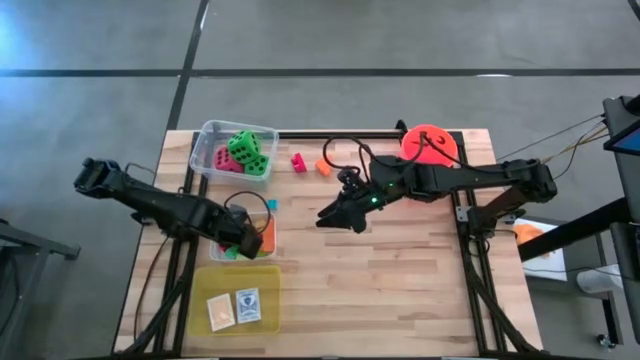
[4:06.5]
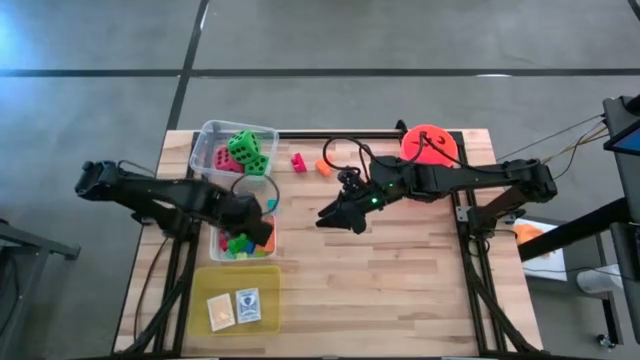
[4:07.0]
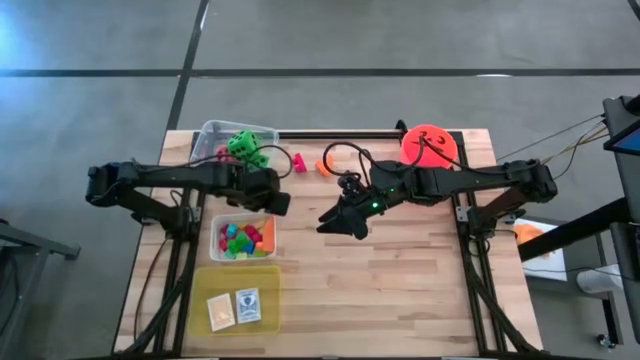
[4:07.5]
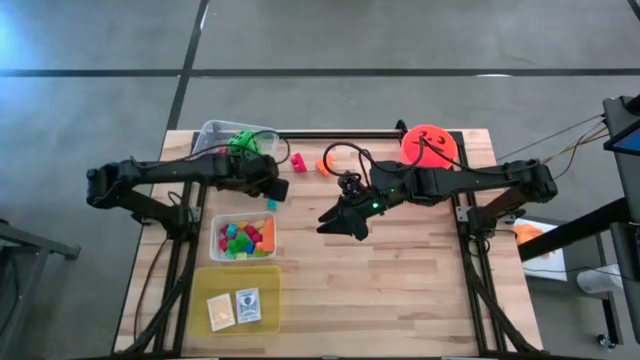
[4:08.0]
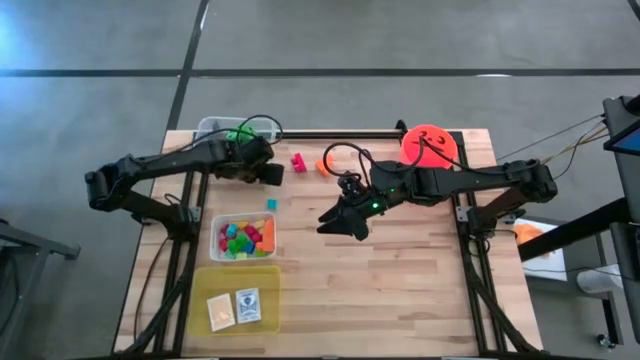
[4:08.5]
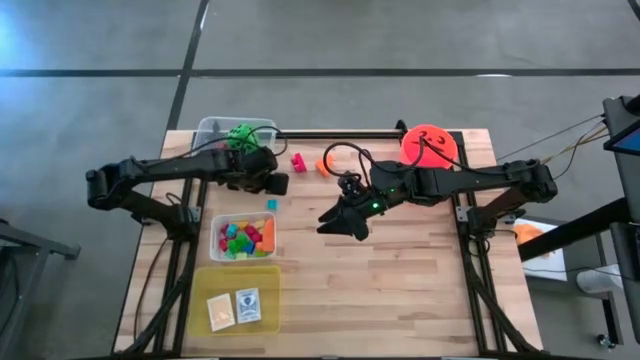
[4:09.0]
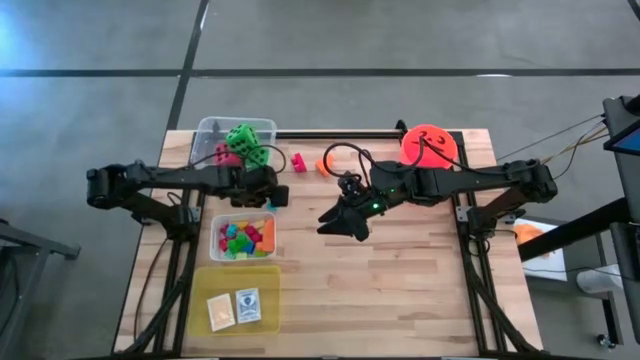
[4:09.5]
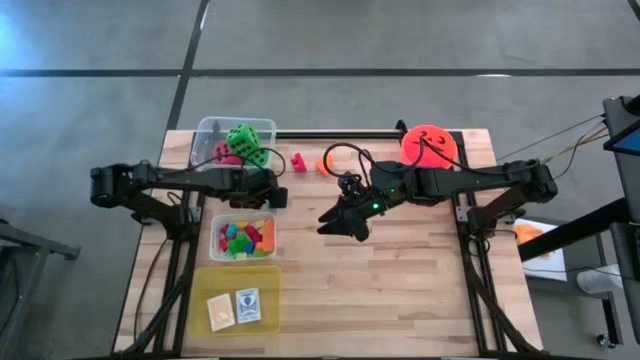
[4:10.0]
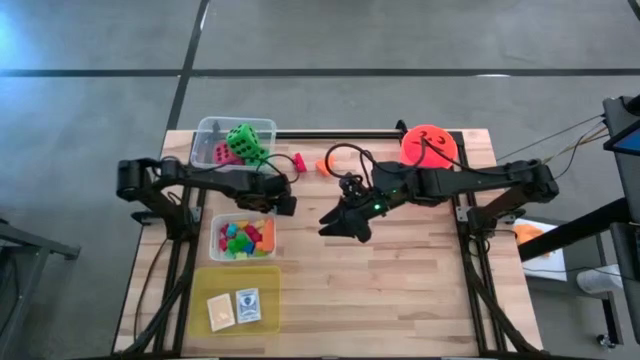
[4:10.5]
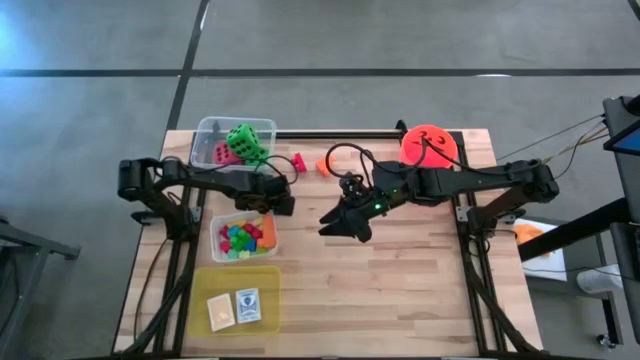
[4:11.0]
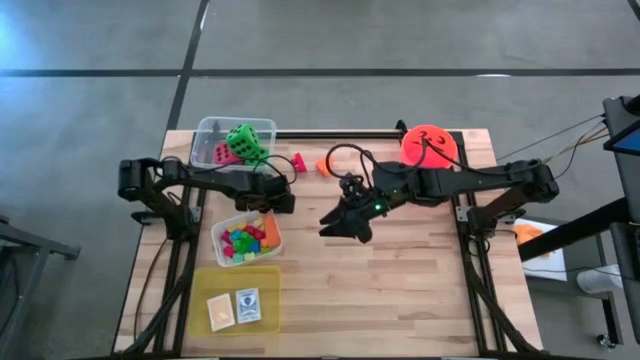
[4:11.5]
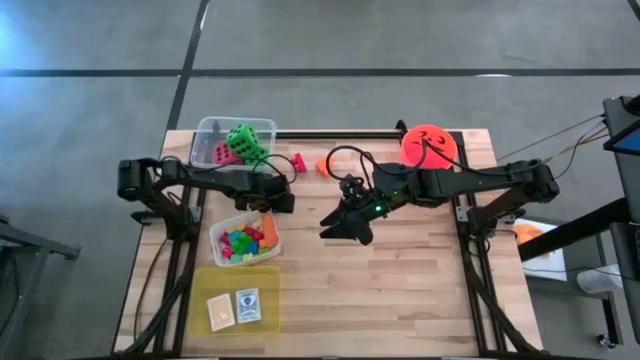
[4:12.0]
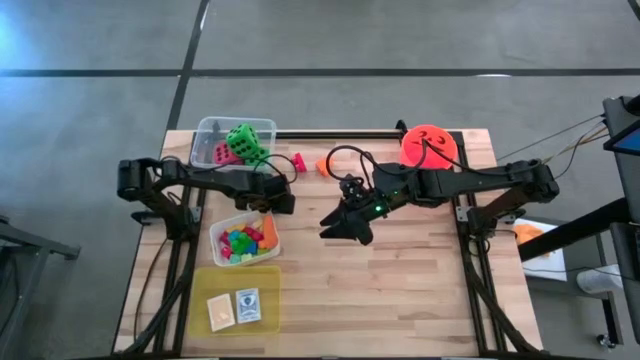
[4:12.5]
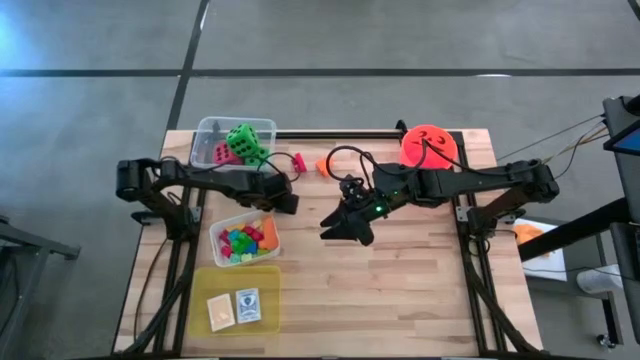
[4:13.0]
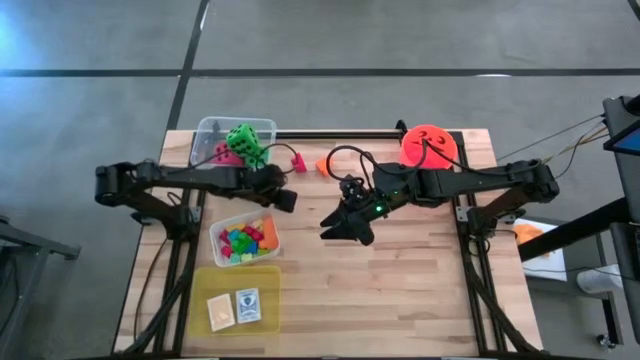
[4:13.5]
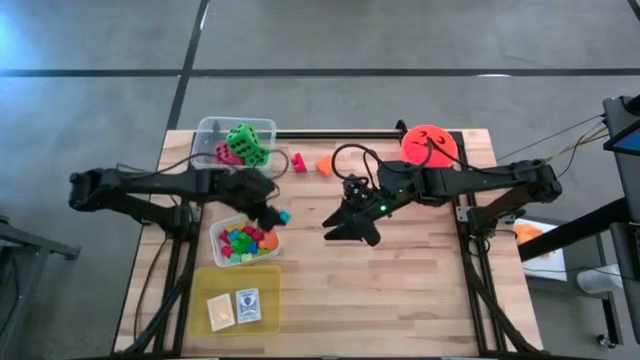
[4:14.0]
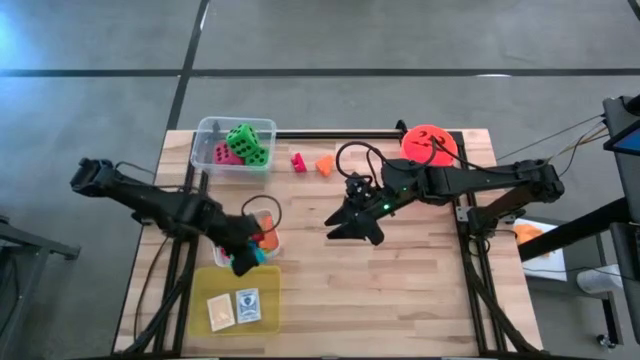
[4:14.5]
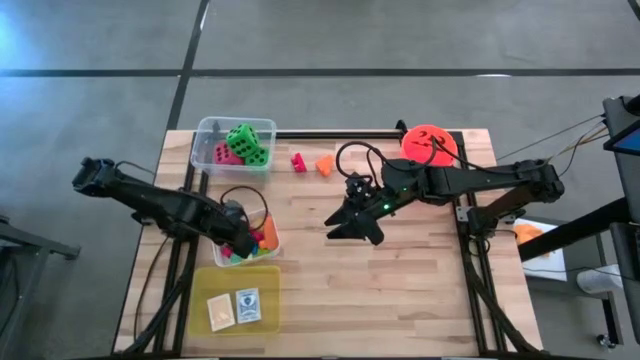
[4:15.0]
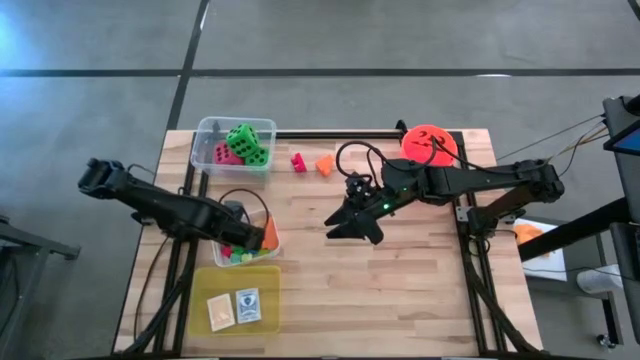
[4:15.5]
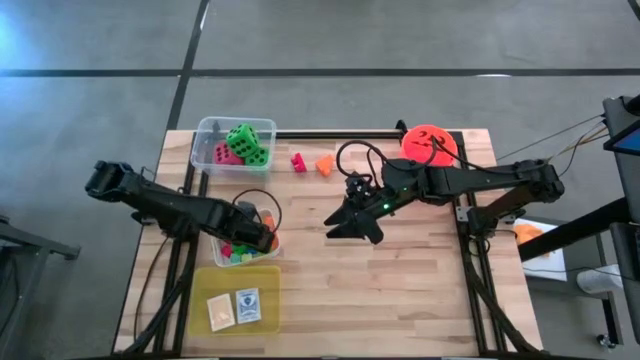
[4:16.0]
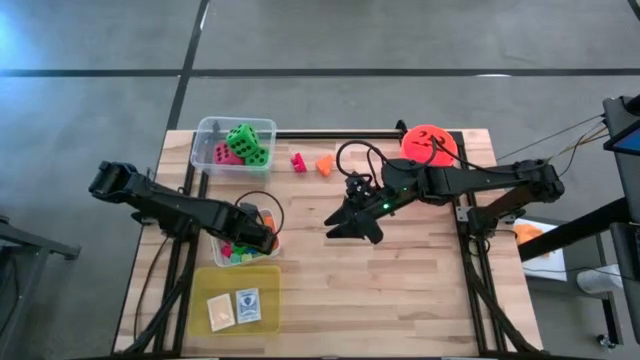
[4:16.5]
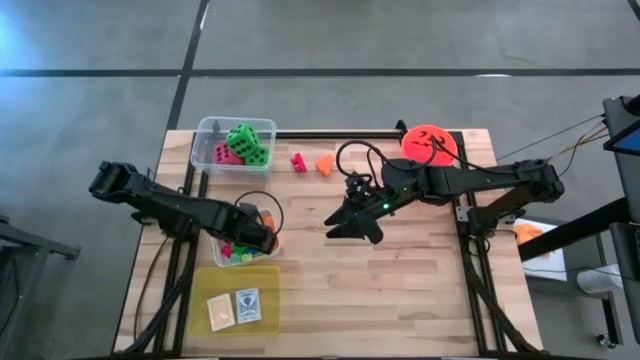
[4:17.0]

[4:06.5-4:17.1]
Task: Pick & Place Toys
Put the blue game piece into the white bin

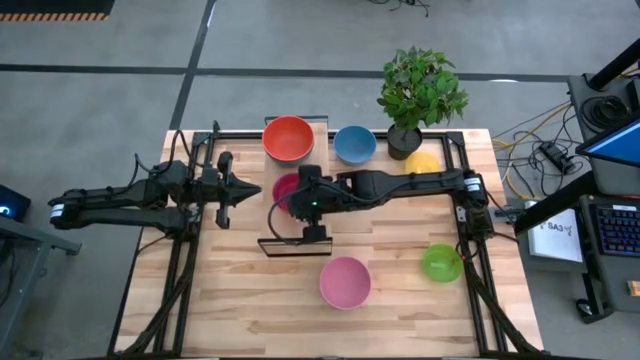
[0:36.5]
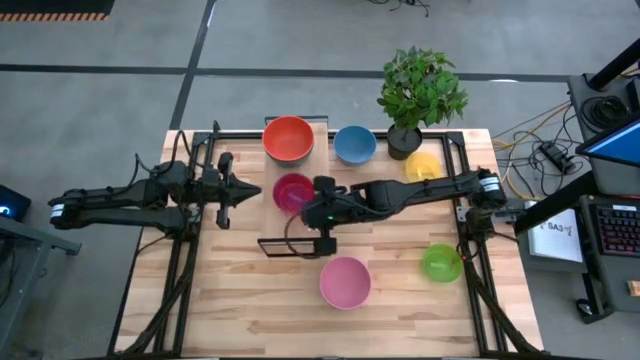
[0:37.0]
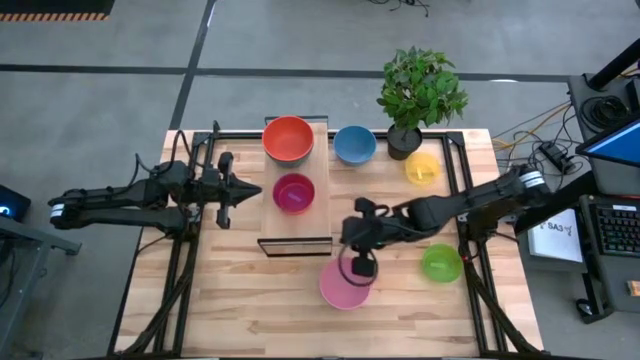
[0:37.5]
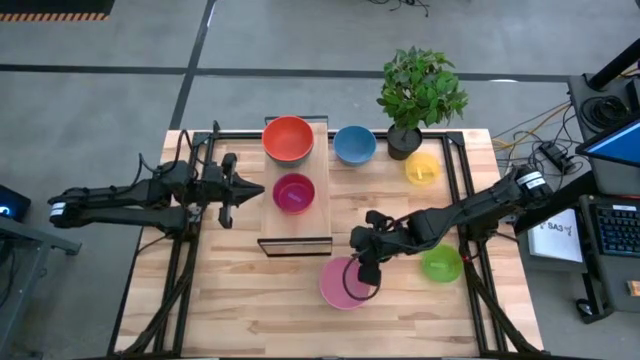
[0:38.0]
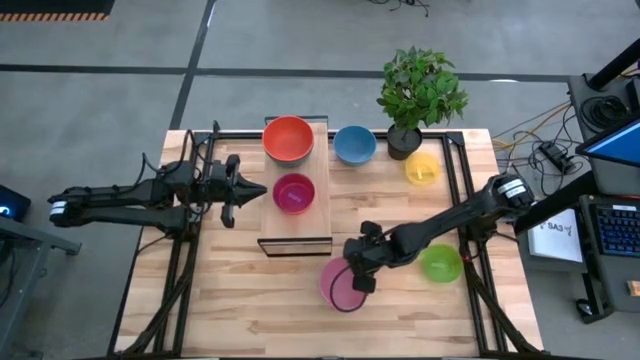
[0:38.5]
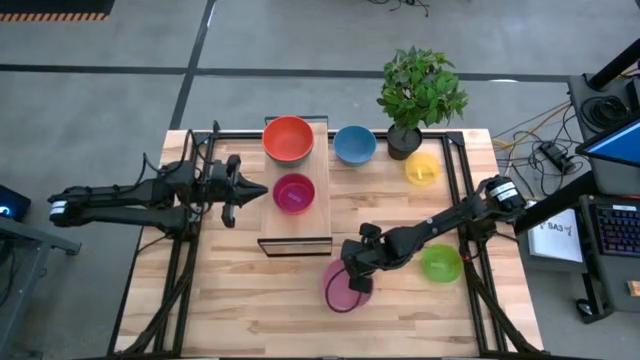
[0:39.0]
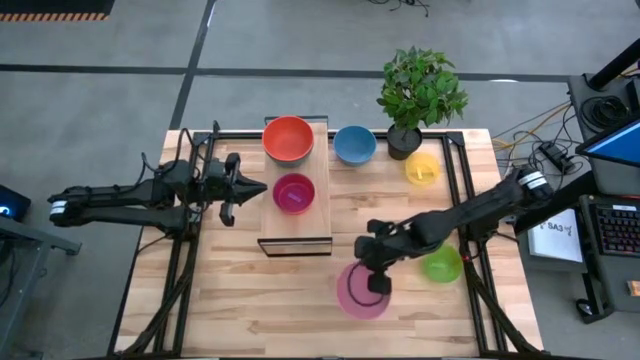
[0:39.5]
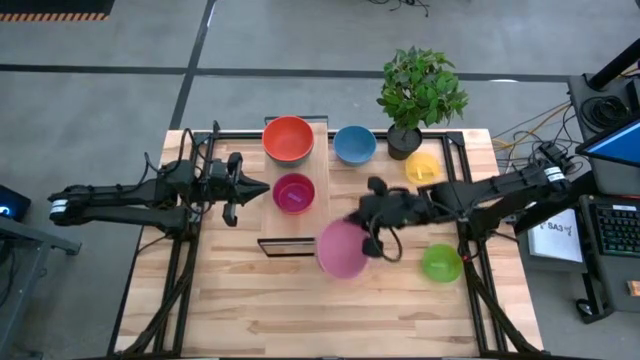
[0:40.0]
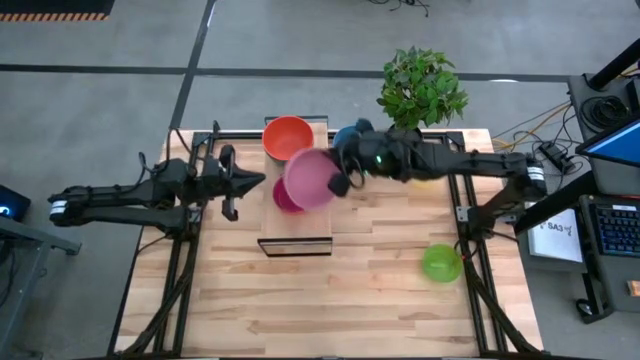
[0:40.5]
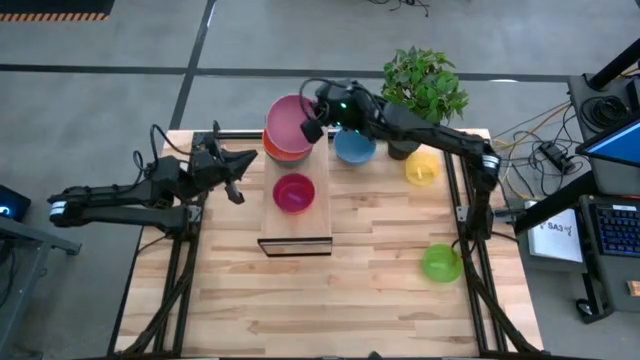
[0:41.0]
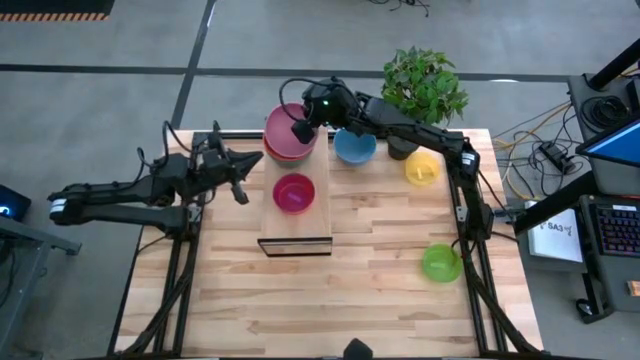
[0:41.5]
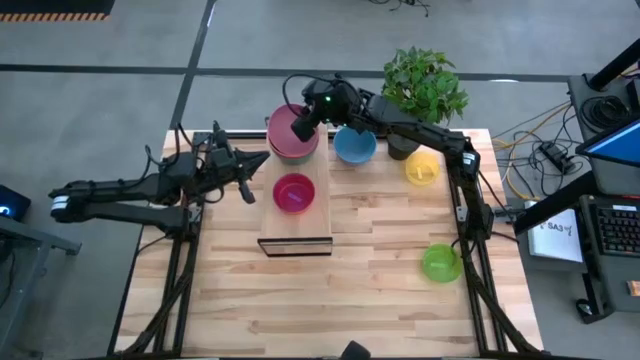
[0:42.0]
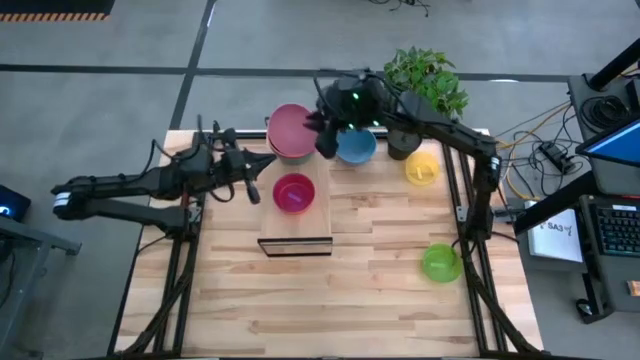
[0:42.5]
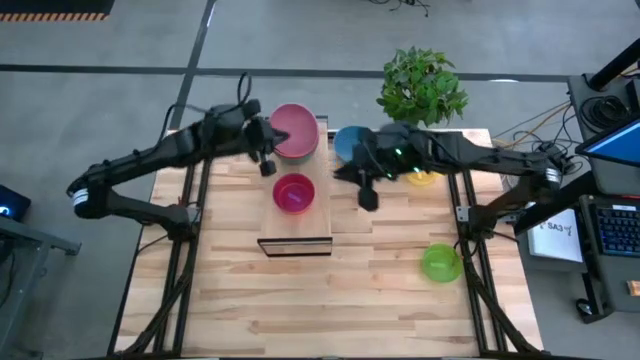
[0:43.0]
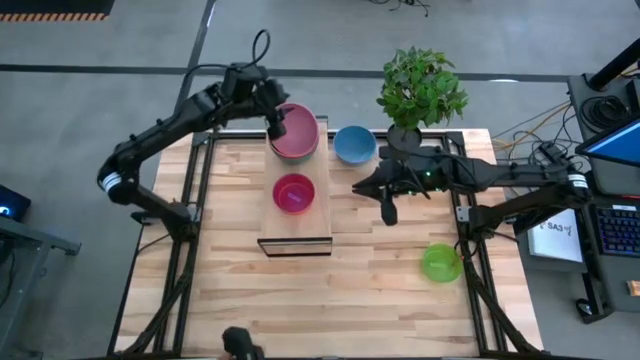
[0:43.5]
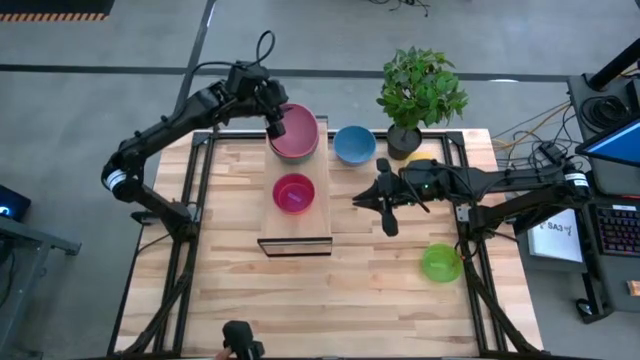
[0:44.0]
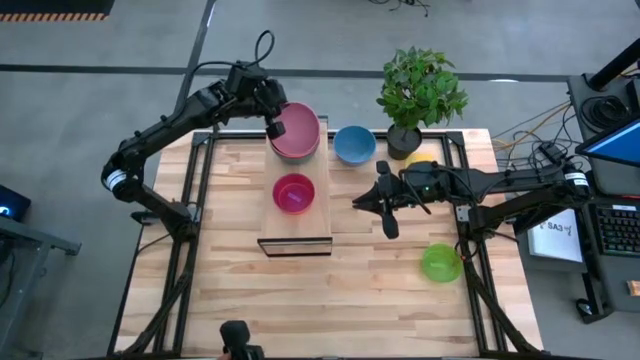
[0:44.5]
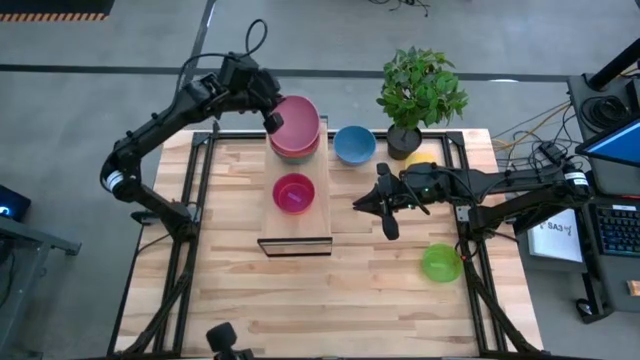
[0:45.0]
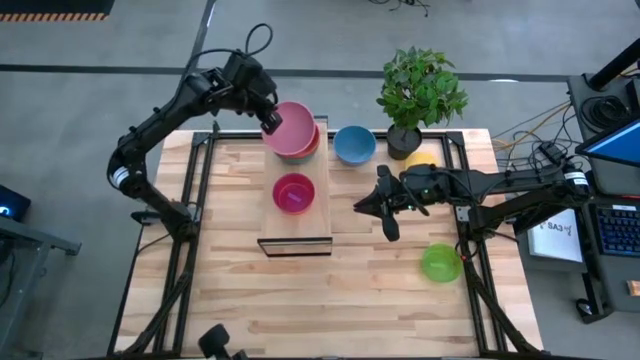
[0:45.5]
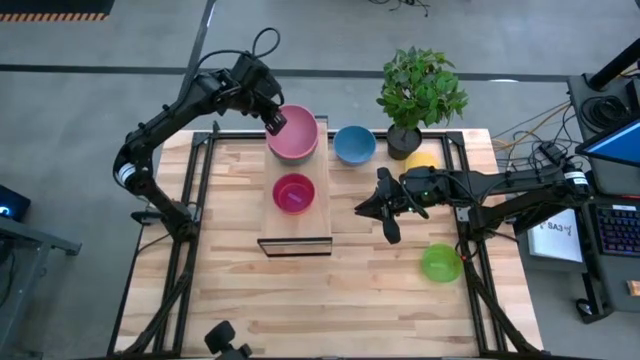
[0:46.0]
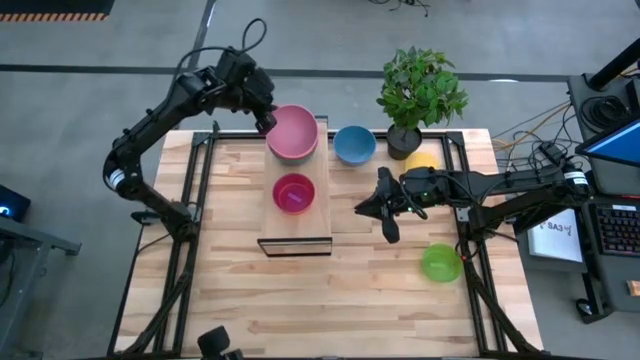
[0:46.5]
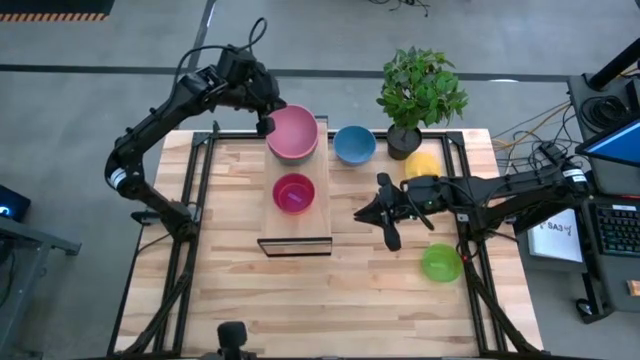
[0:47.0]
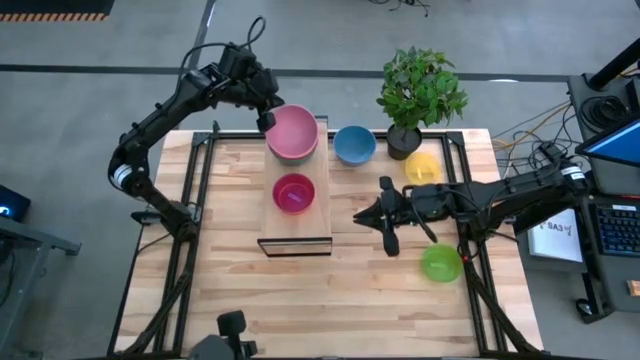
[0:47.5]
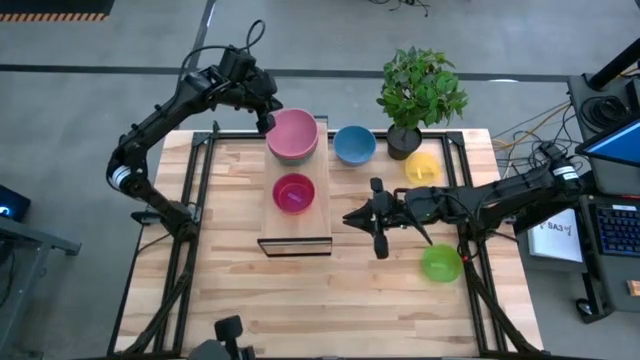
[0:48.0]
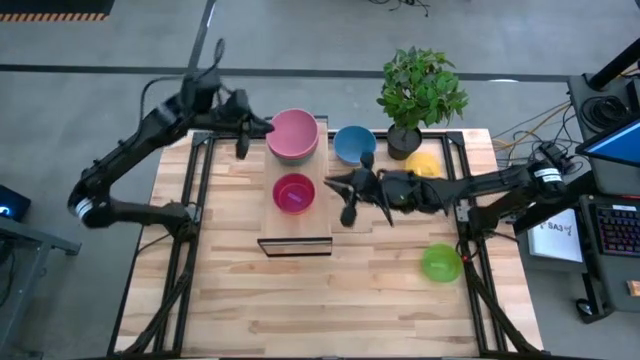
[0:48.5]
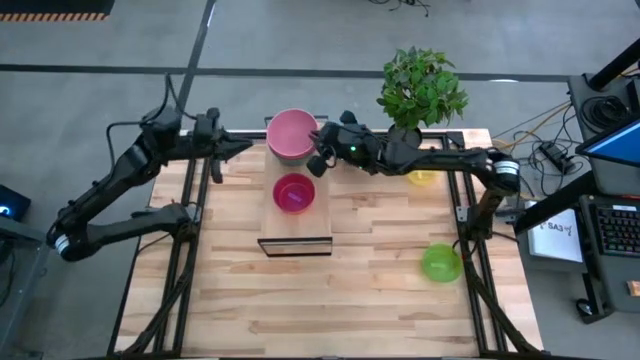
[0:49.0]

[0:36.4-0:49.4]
Task: Place and stack bowls onto a shelf
Stack the pink bowl on top of the orange bowl on the shelf
